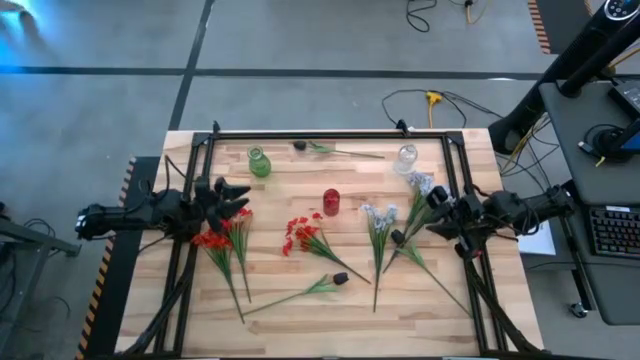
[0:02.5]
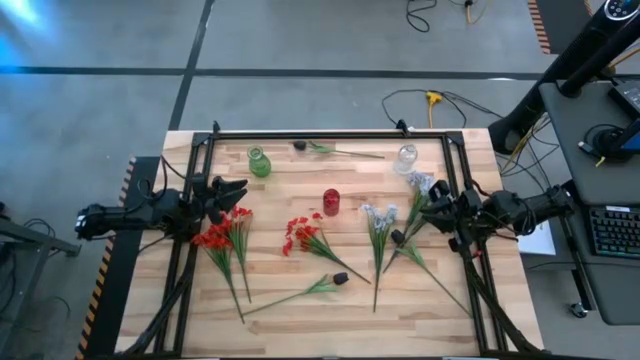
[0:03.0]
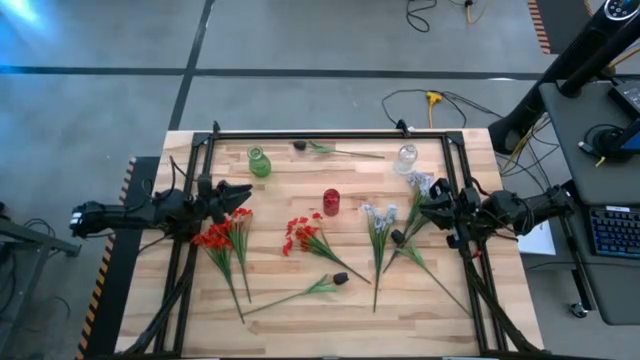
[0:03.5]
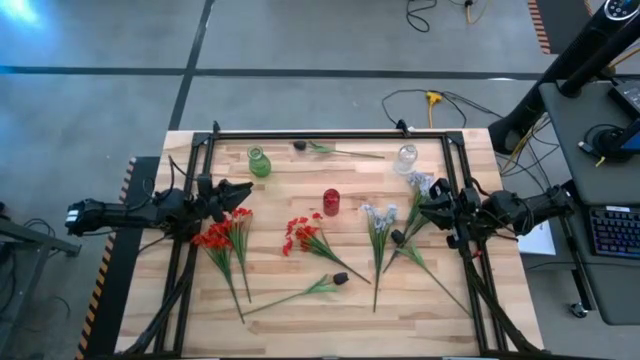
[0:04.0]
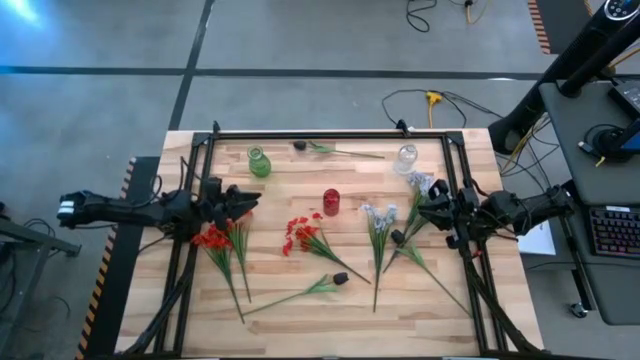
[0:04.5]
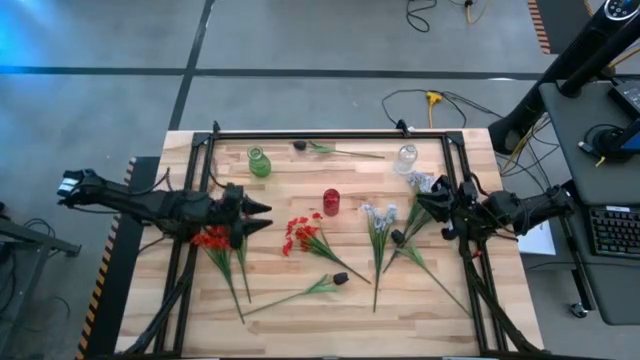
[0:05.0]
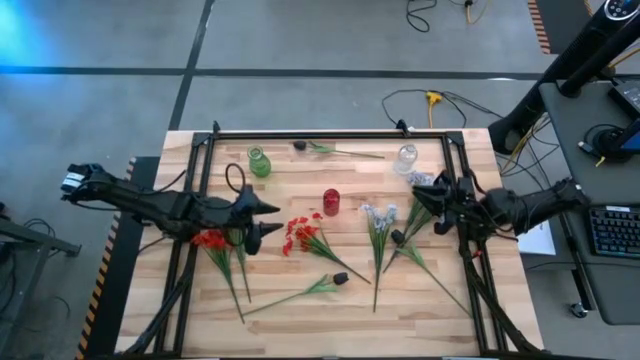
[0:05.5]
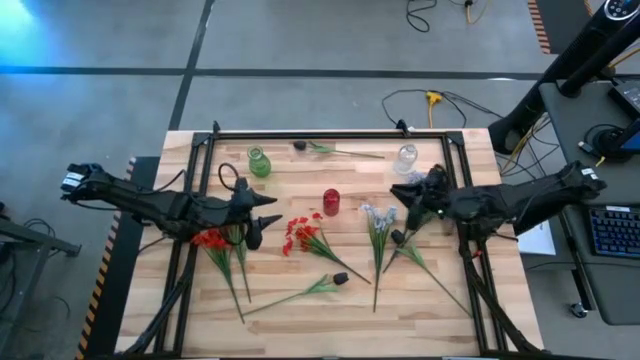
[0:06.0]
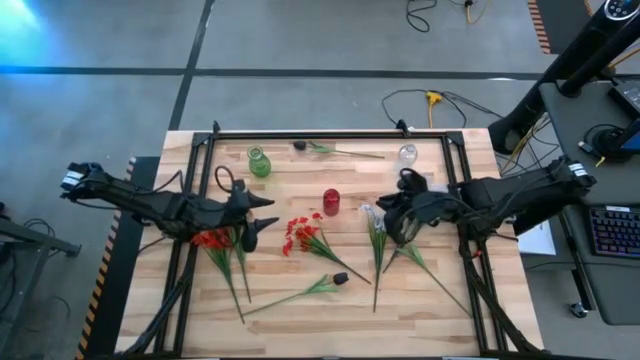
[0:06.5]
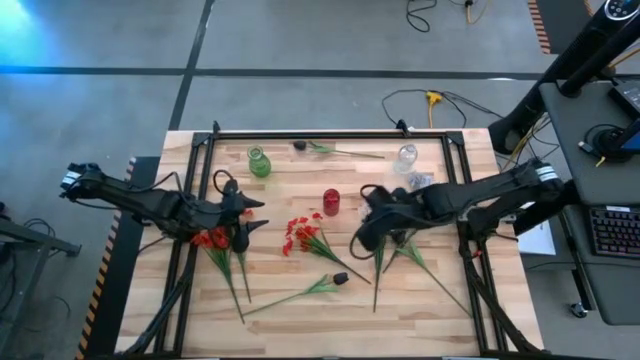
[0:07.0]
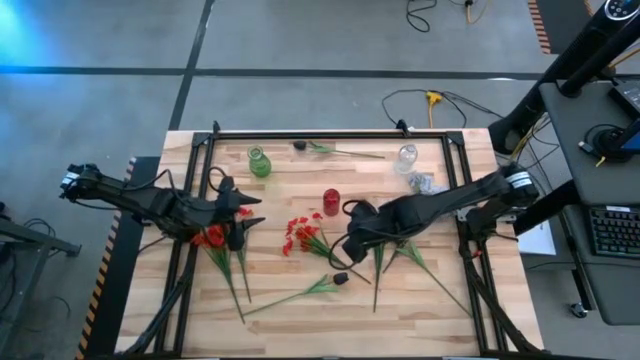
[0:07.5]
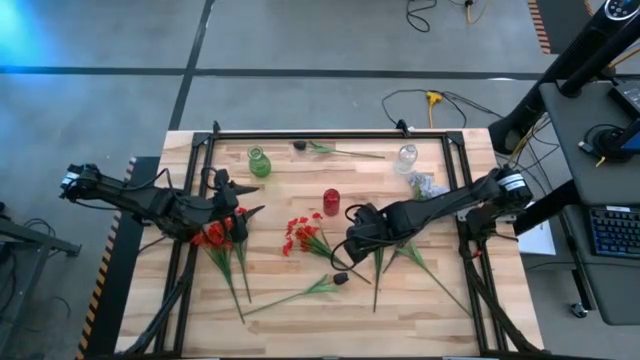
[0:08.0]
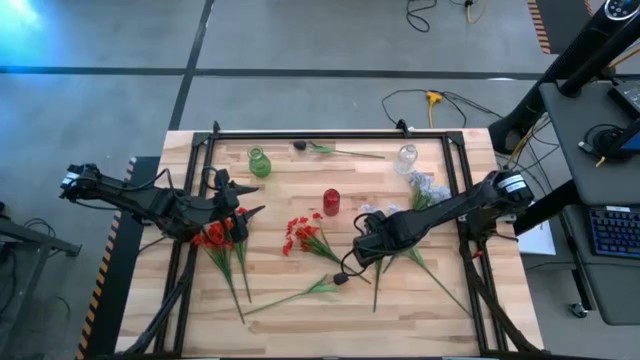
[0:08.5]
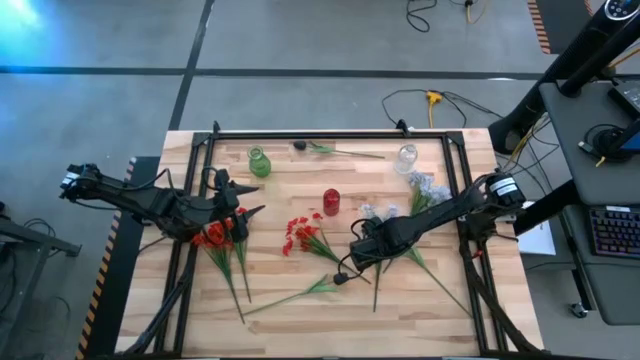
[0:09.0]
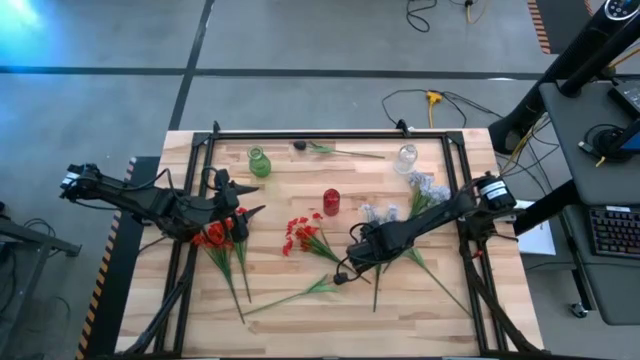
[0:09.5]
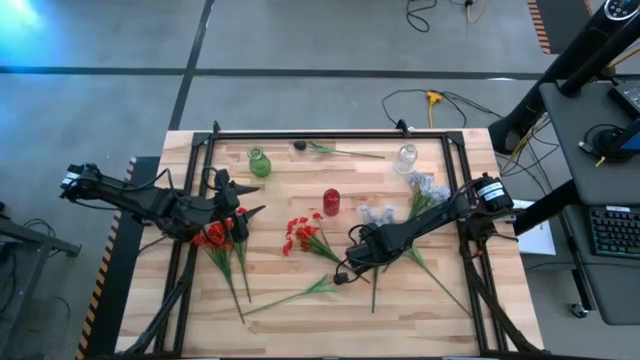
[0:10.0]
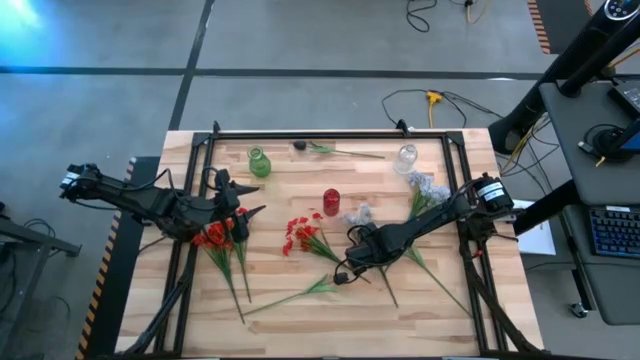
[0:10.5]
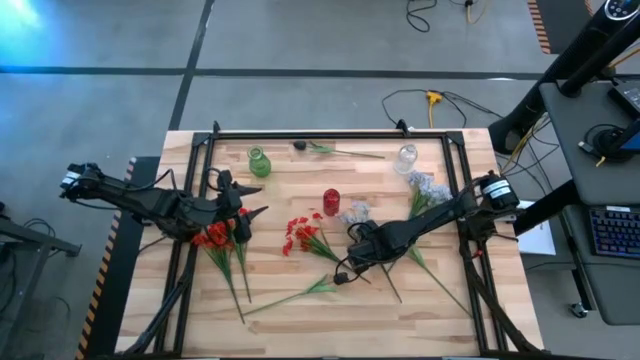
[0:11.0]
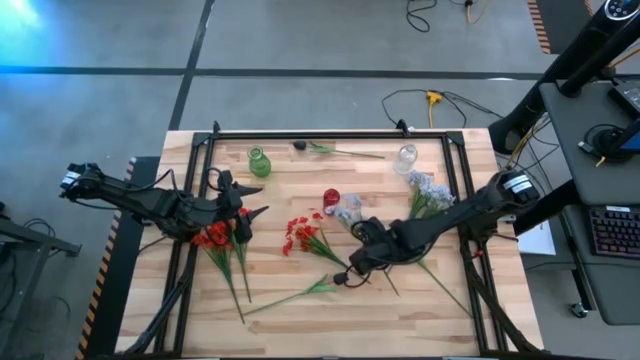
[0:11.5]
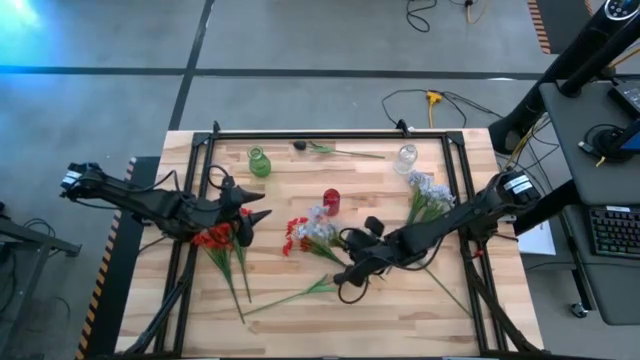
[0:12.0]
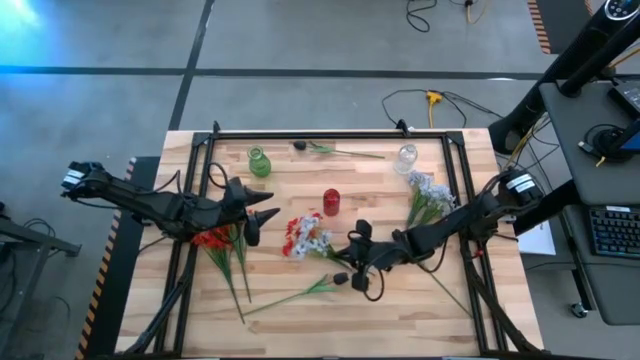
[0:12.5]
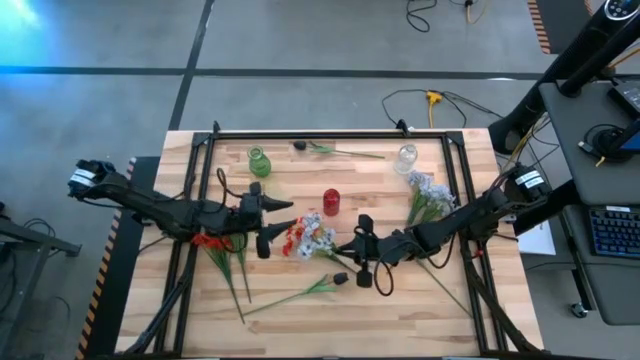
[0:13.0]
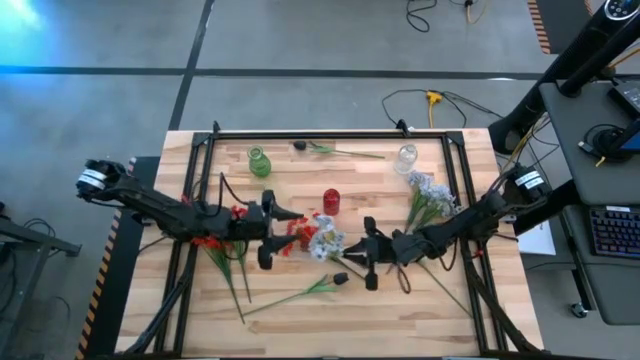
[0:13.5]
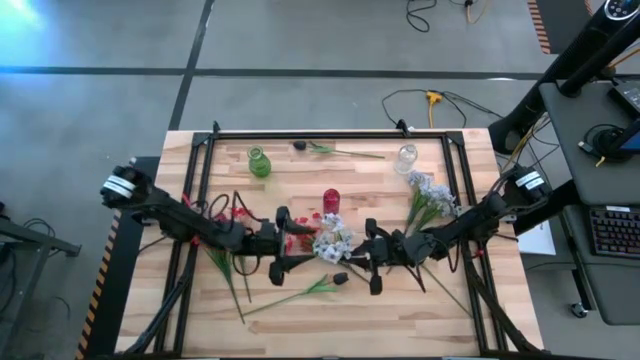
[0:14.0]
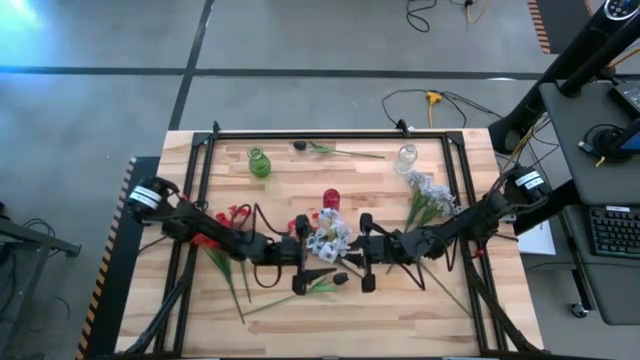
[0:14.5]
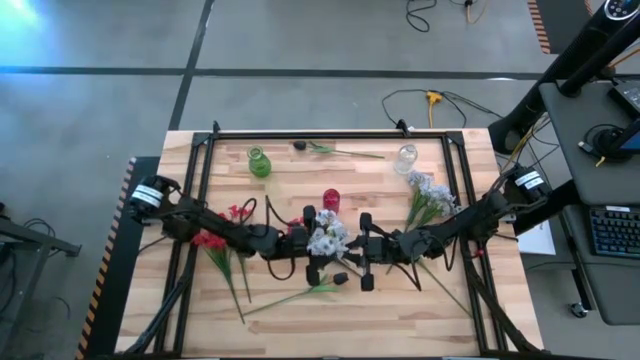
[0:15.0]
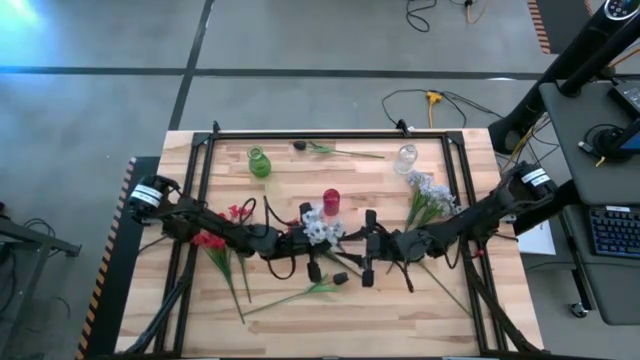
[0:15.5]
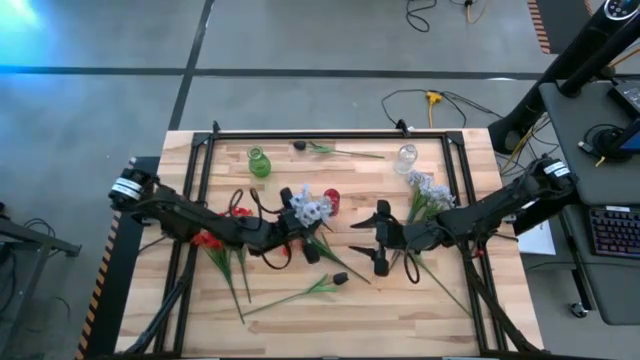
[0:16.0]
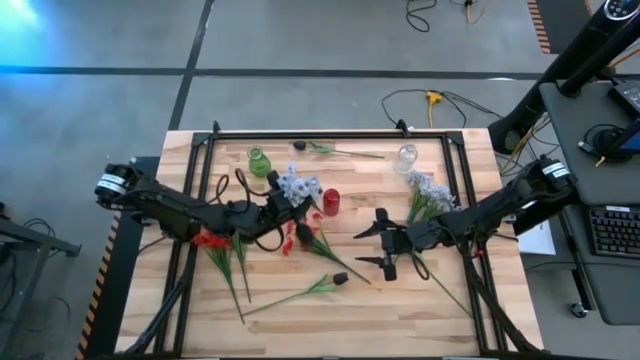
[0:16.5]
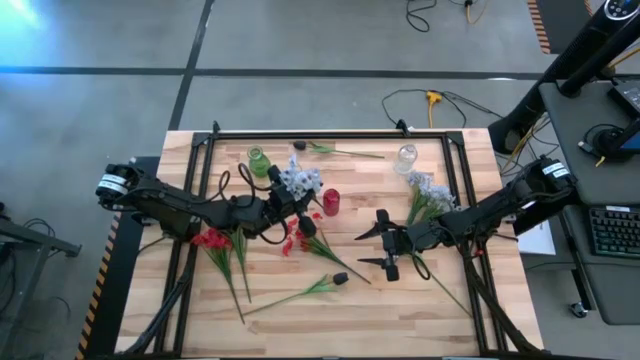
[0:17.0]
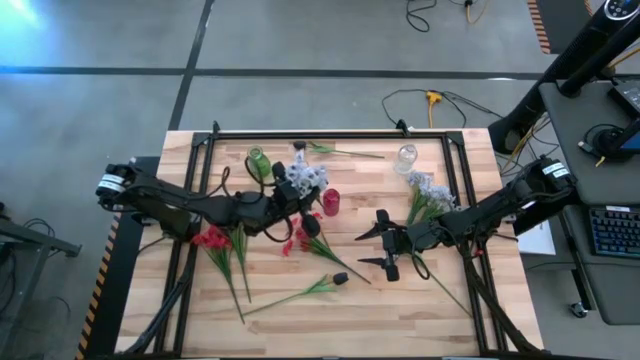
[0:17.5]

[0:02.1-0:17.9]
Task: Sort flowers into vase by color
Put the left white flowers into the red vase

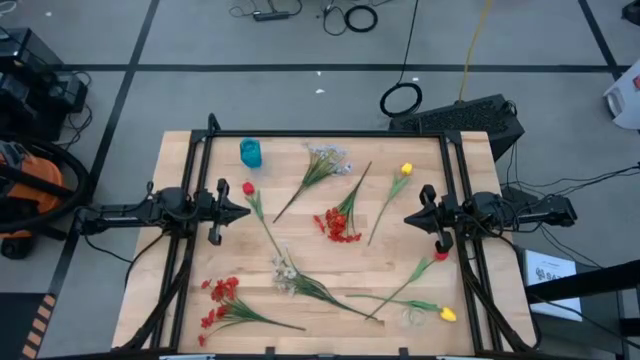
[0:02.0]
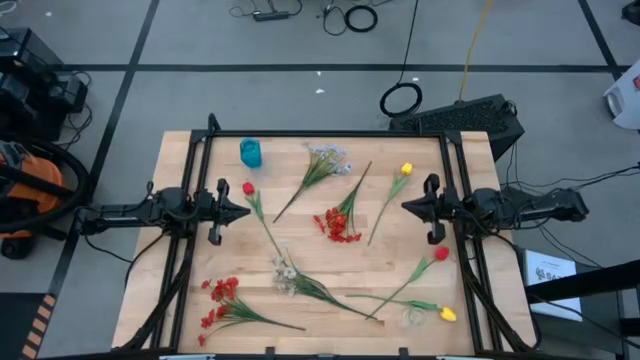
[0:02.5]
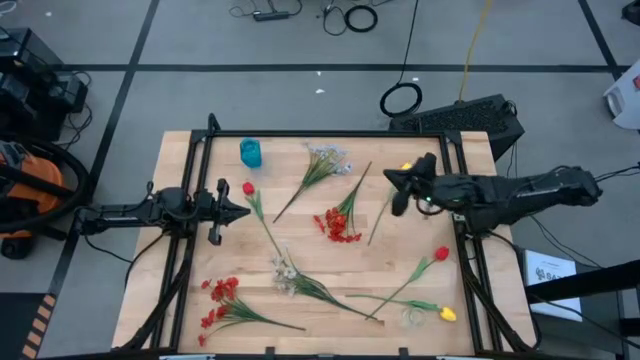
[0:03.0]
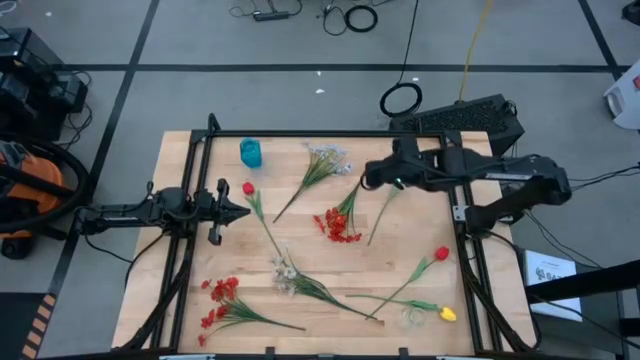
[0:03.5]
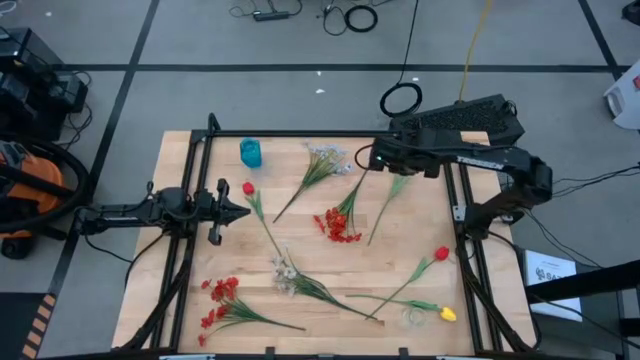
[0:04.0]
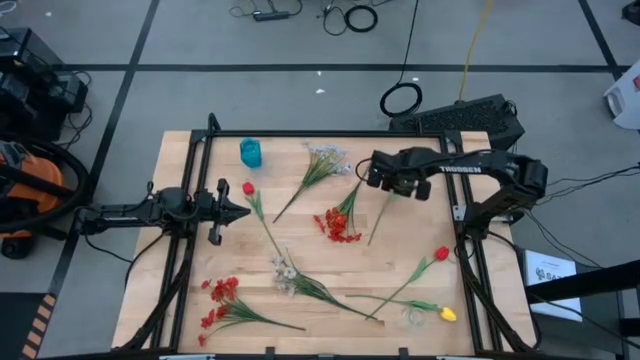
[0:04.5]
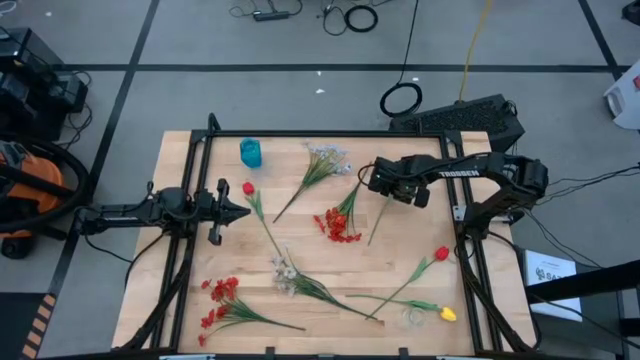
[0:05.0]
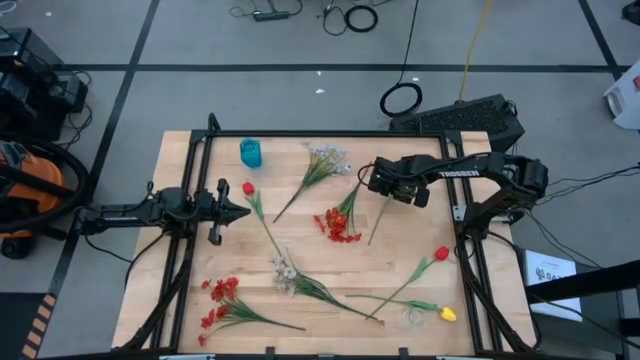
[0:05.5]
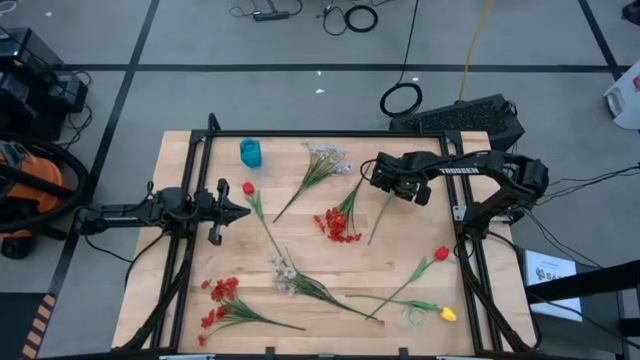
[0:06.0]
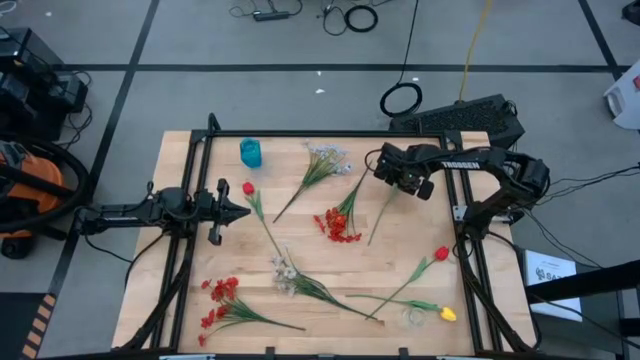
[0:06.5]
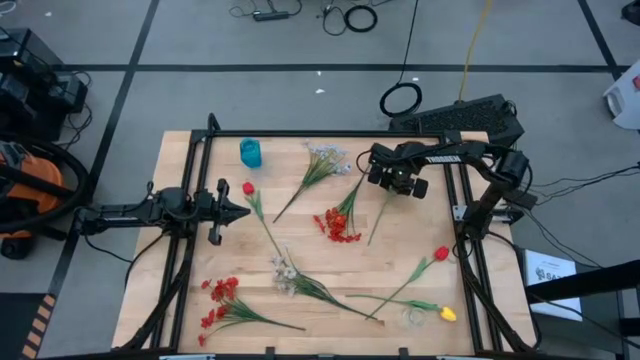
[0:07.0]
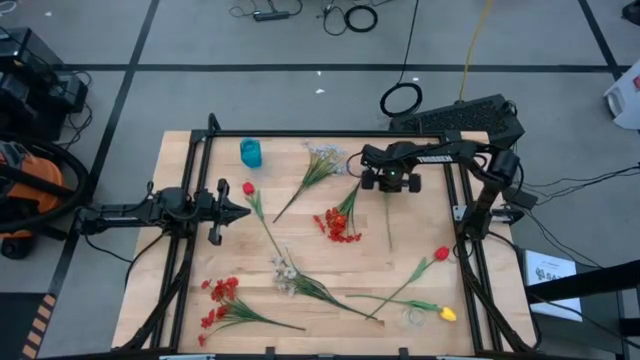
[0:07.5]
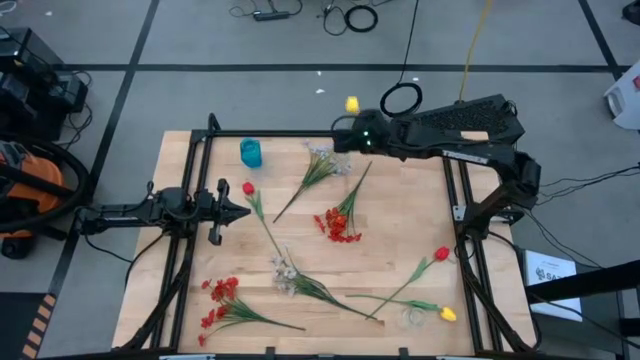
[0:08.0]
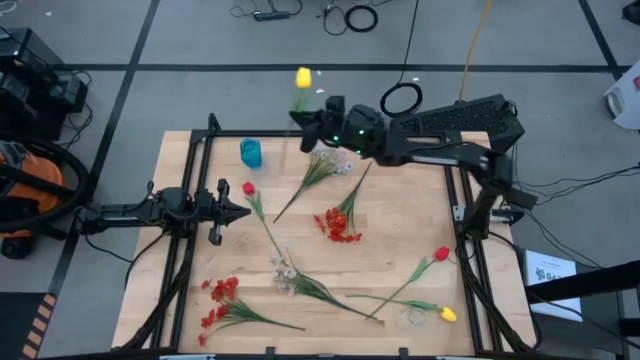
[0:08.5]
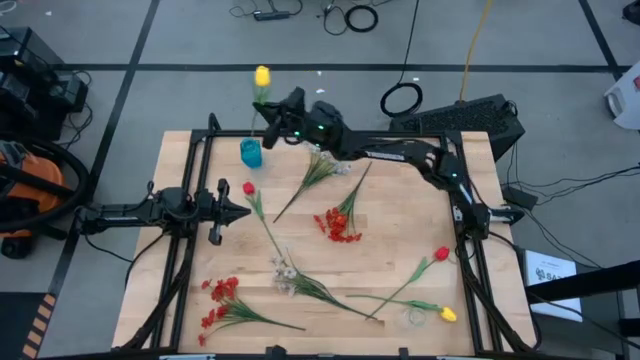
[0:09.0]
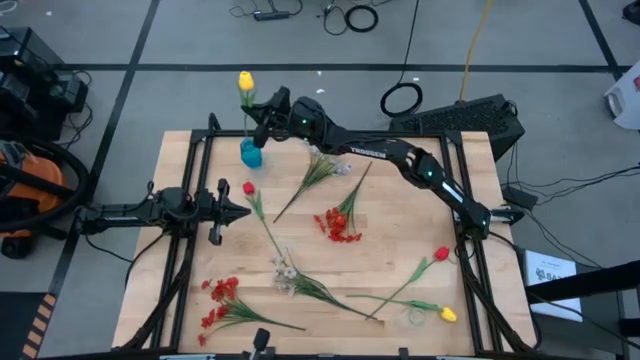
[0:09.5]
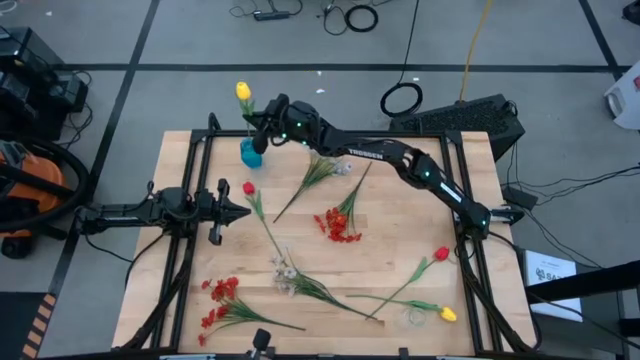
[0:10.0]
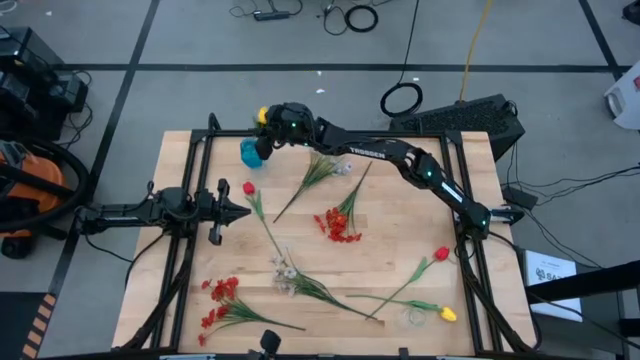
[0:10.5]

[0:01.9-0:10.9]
Task: Sort flowers into vase by color
Put the top yellow tulip into the blue vase
